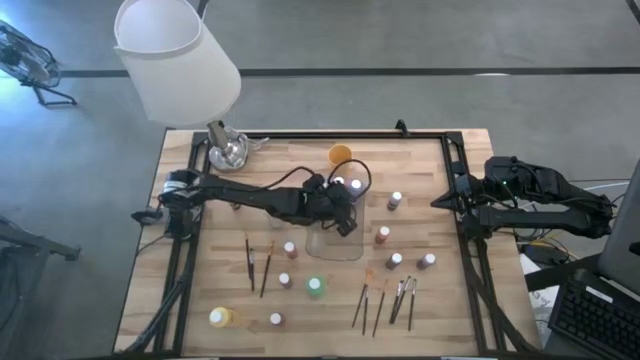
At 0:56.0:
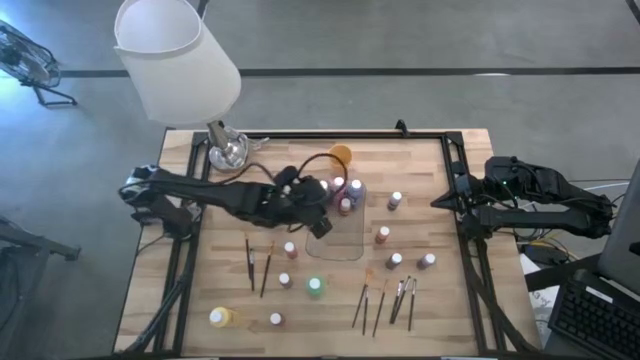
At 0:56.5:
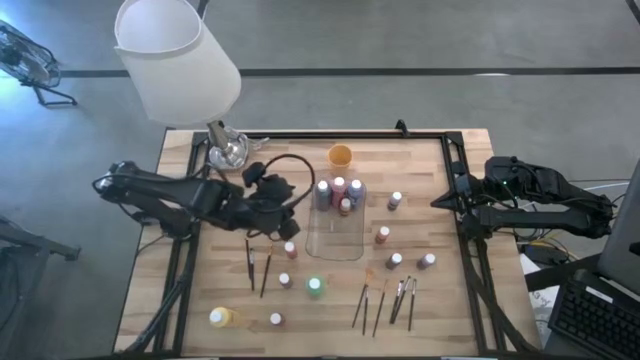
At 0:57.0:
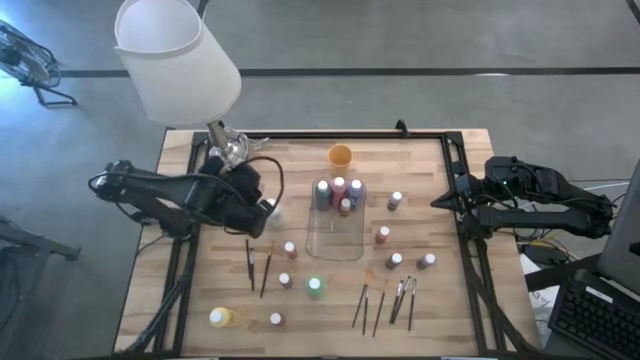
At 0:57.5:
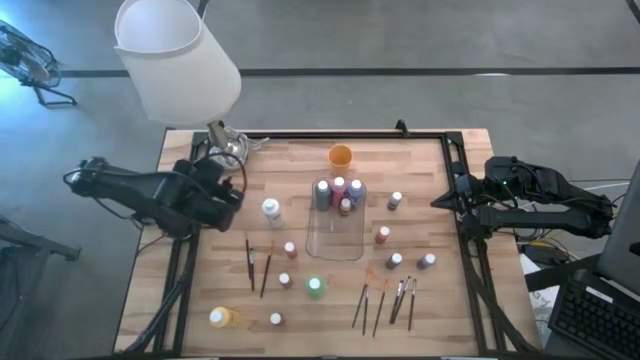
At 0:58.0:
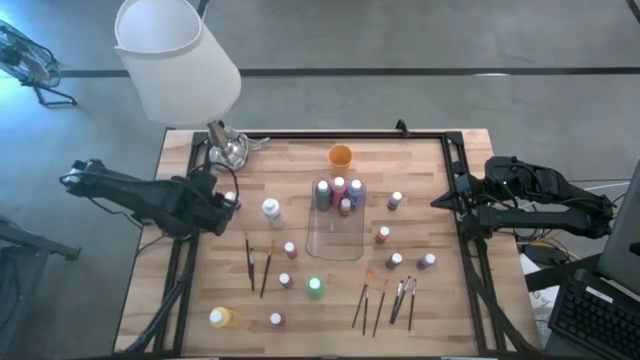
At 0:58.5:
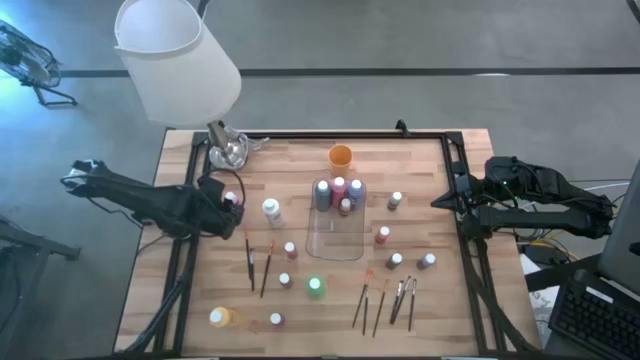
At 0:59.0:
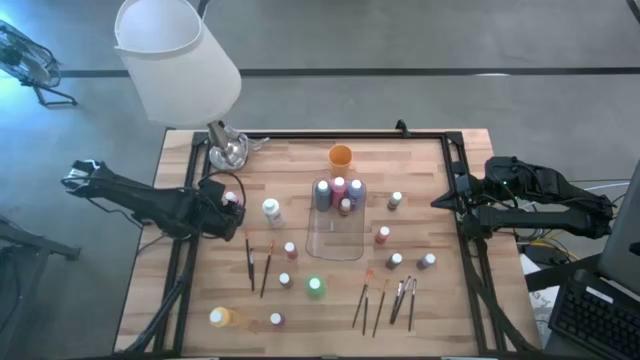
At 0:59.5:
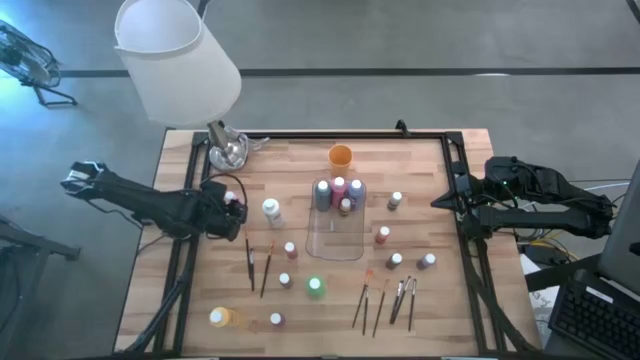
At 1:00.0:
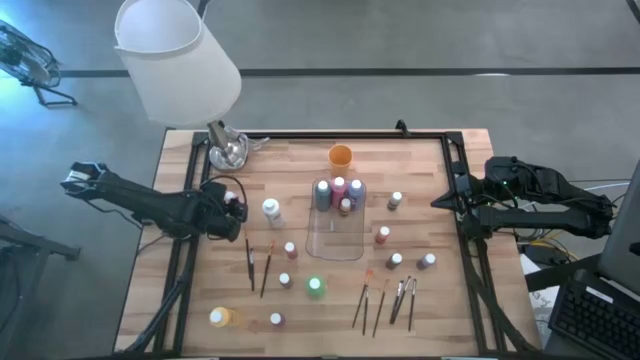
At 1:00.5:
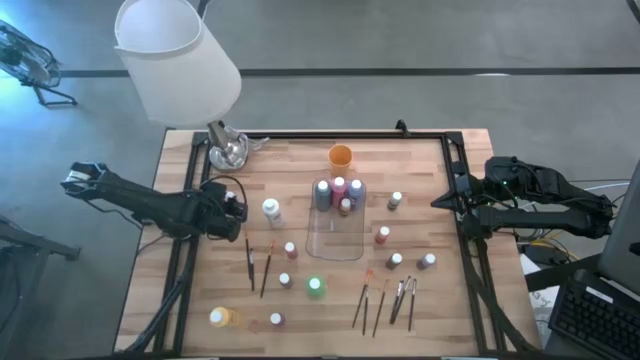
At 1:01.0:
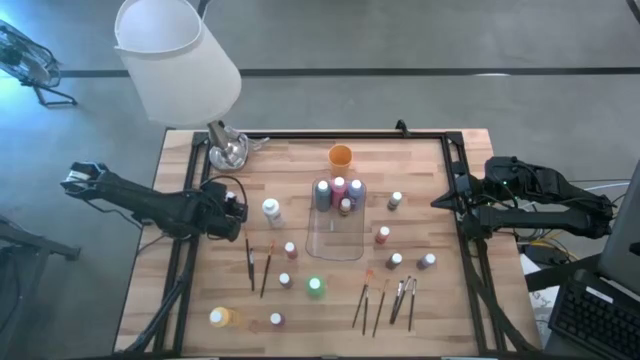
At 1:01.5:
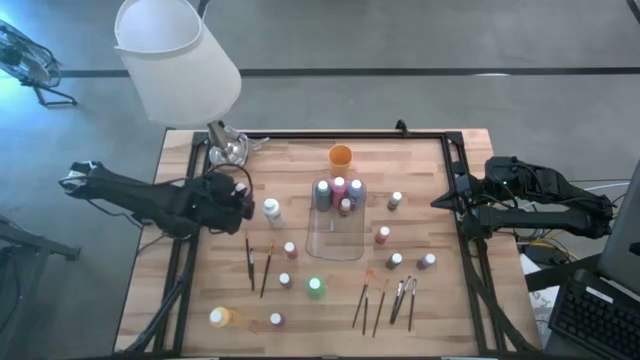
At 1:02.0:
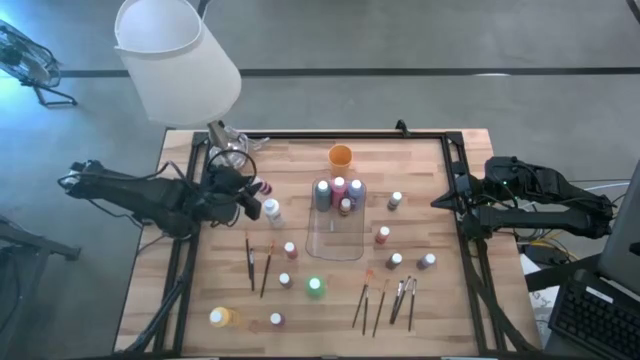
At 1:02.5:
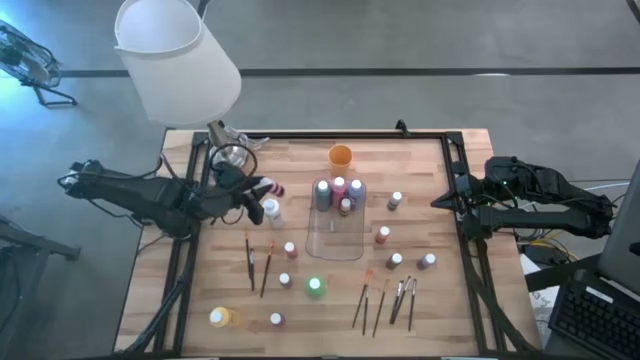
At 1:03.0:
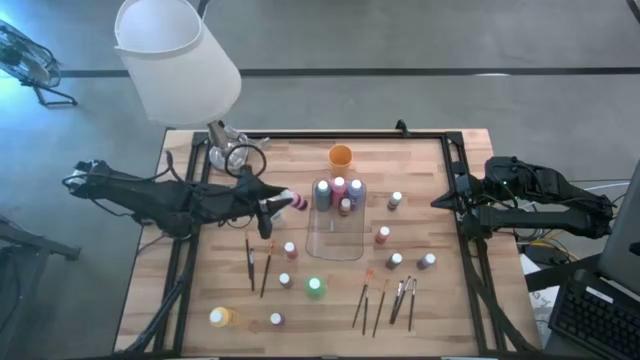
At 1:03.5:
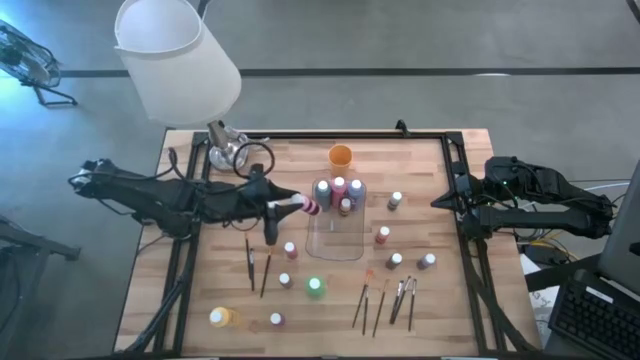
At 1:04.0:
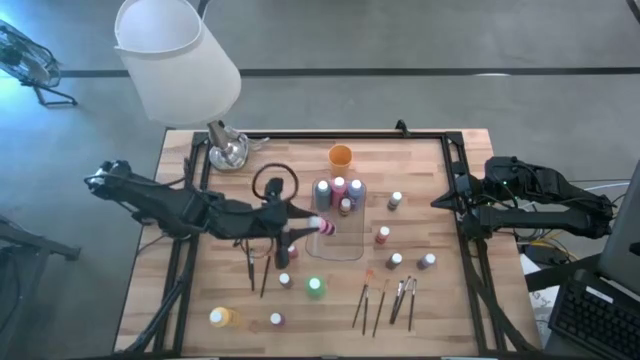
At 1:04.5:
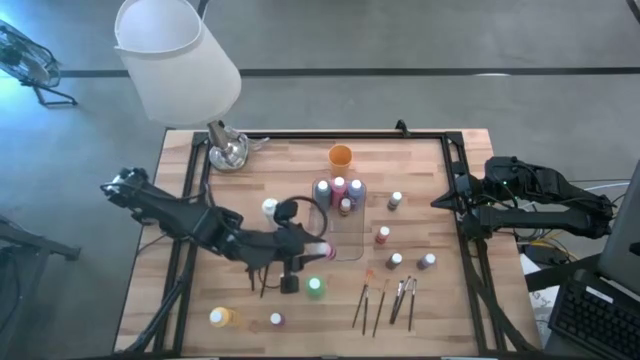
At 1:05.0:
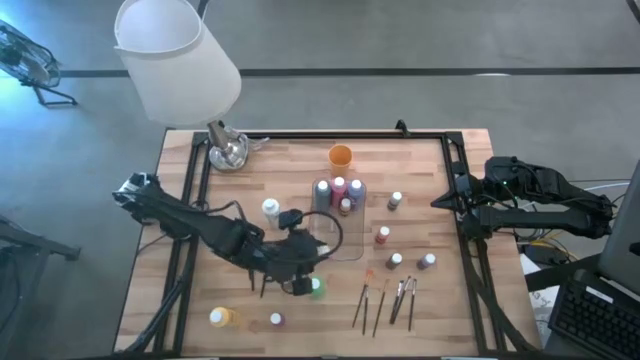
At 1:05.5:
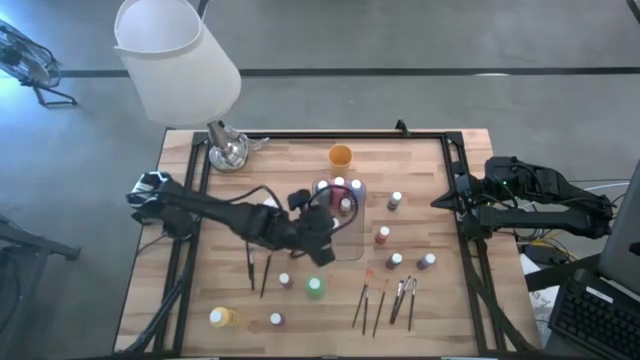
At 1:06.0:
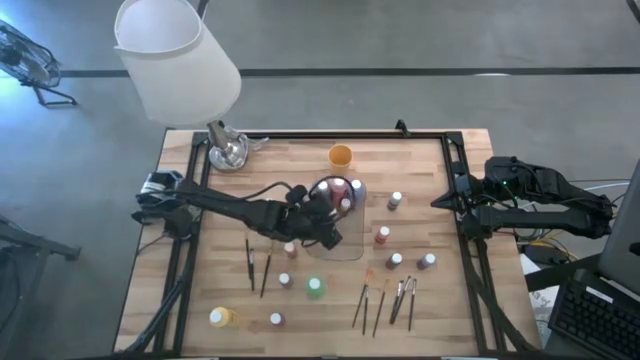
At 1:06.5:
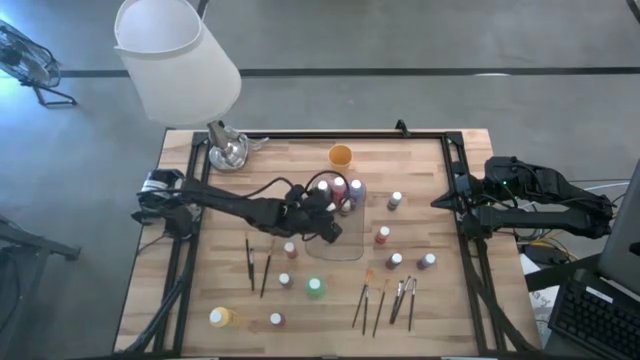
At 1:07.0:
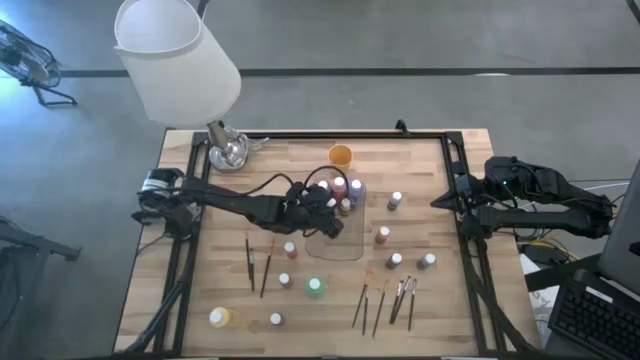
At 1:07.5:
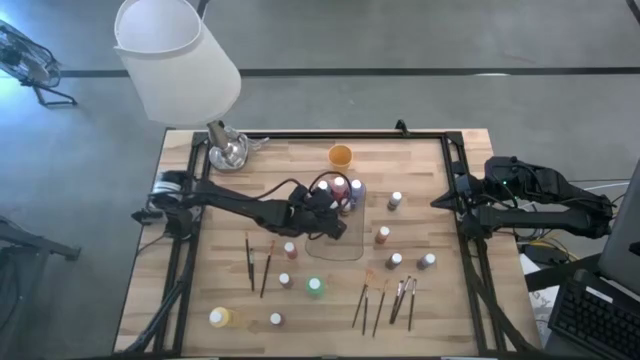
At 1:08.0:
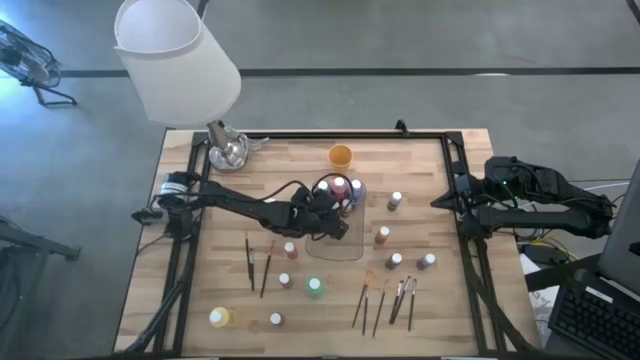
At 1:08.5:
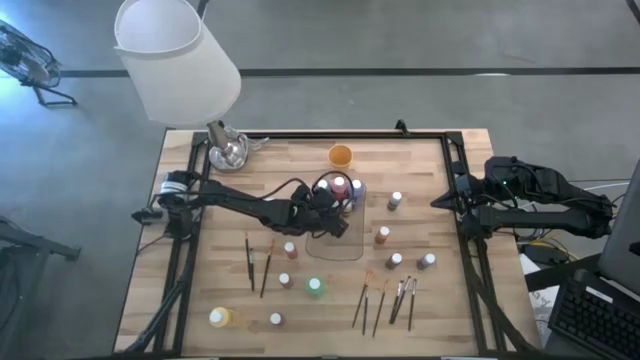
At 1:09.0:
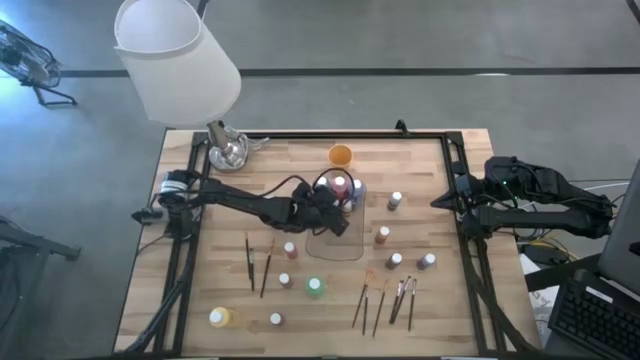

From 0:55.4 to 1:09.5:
Task: Pick & Place Paint Supplies
Put the pink paint bottle into the transparent bin

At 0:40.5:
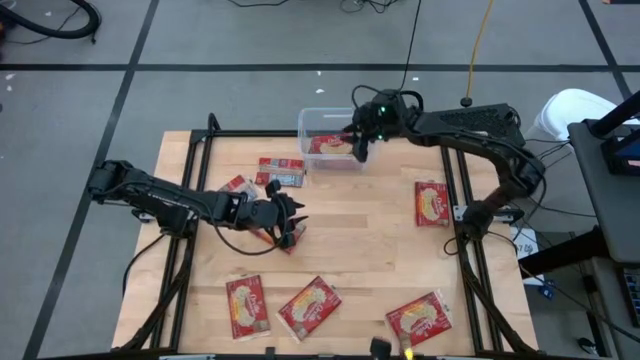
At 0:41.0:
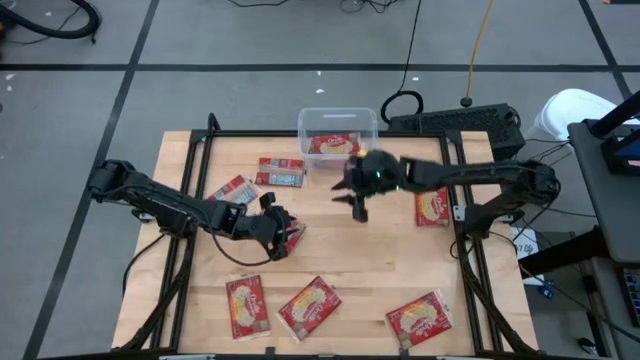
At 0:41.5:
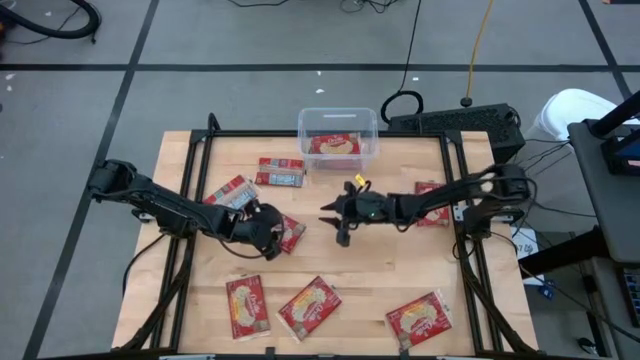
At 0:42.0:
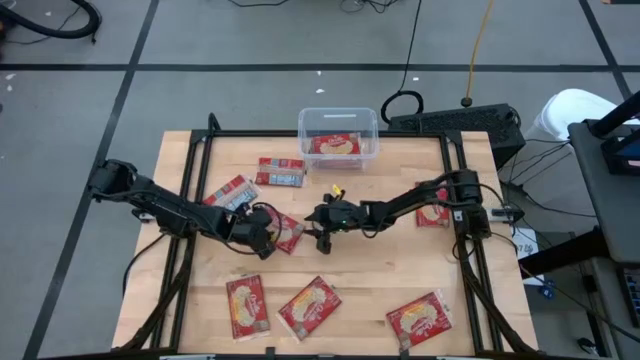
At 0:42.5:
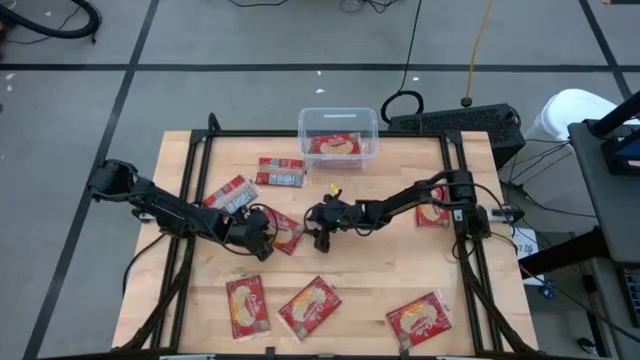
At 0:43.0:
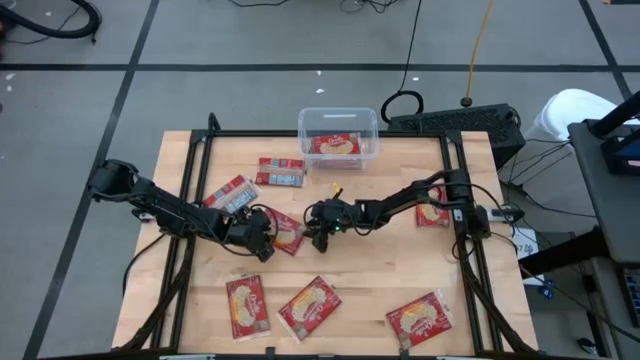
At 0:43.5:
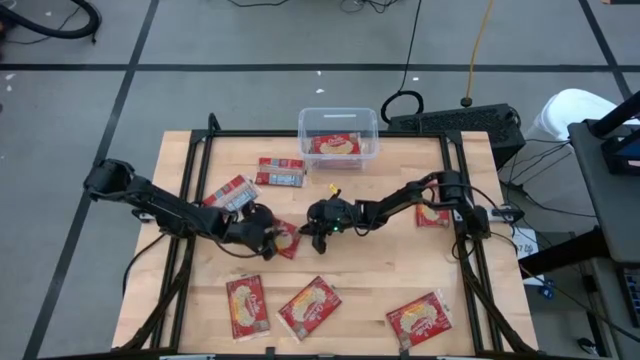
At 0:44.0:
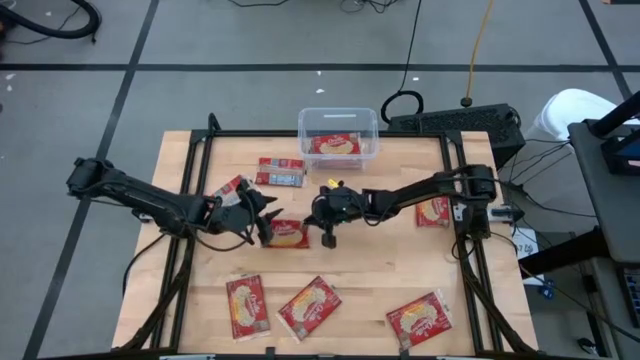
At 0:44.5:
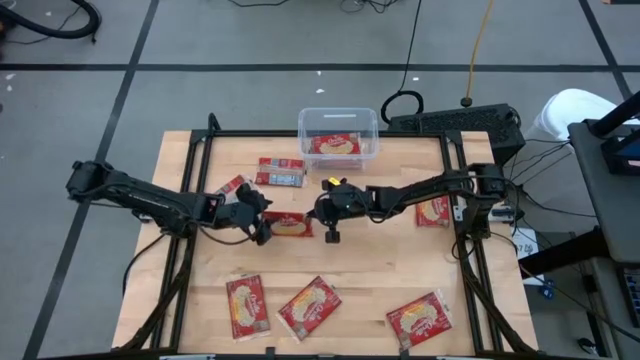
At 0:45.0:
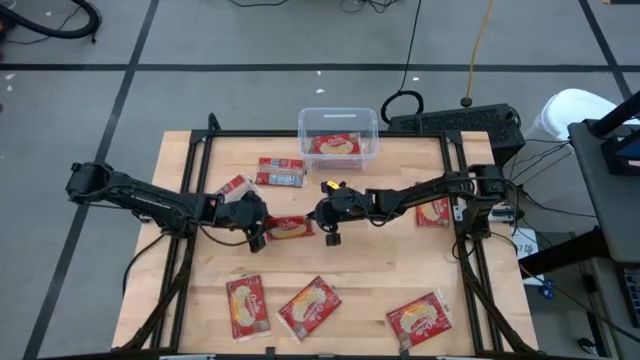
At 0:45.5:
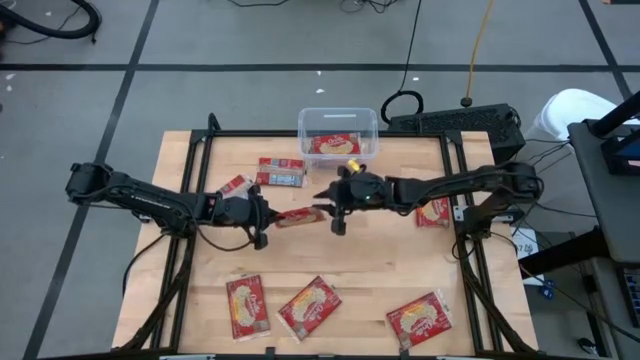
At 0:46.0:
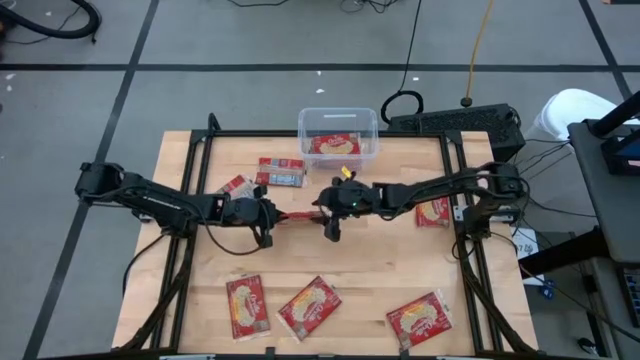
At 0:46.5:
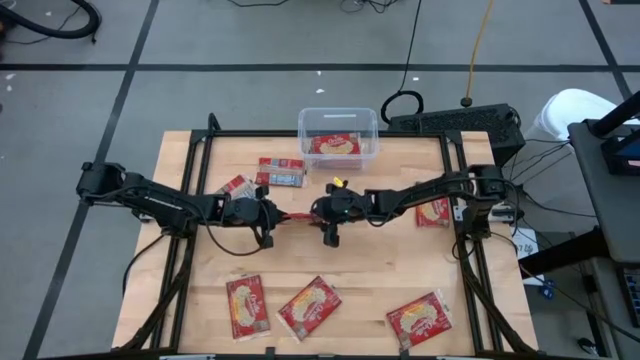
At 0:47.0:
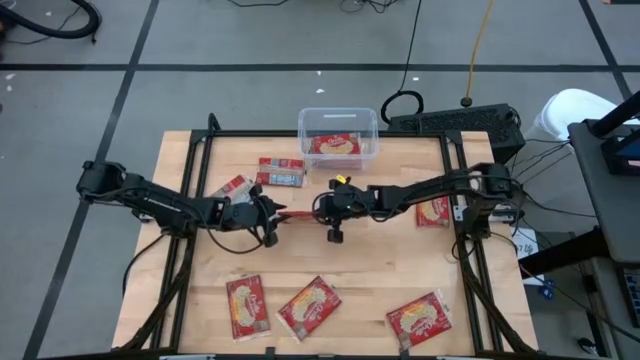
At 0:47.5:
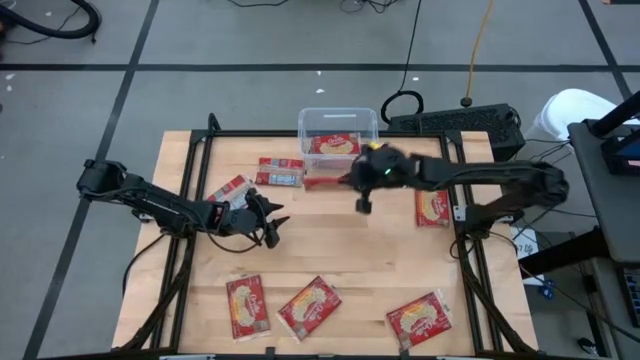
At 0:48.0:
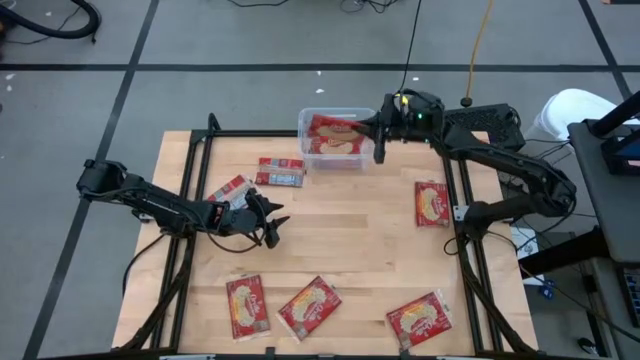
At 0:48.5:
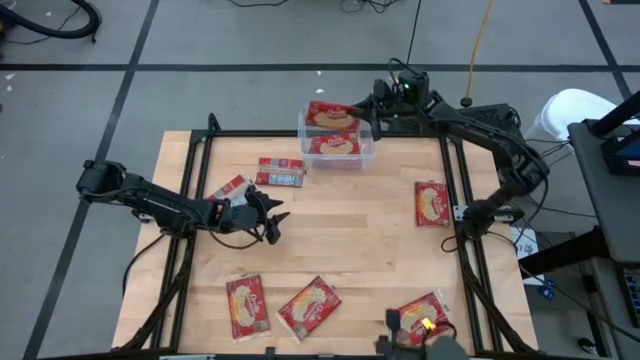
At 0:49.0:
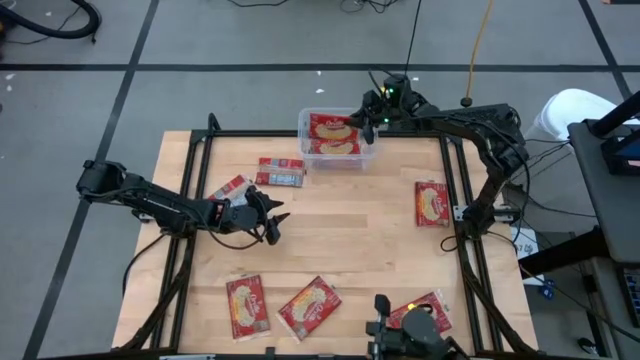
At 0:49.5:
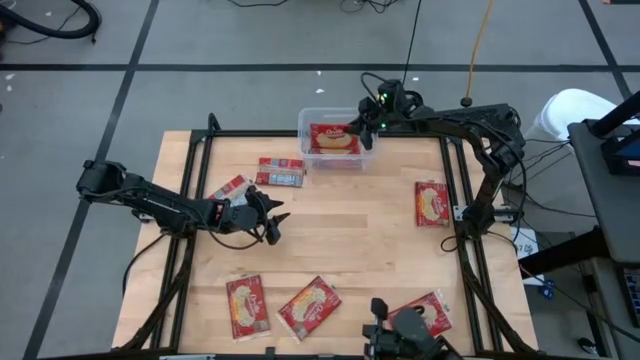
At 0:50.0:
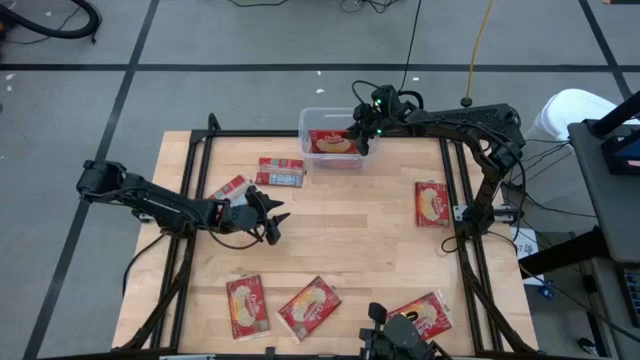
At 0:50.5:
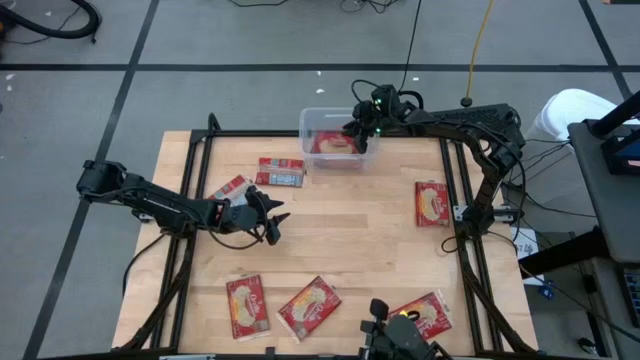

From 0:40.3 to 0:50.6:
Task: Sort popcorn bags into baskets
Put the popcorn bags into the transparent bin
